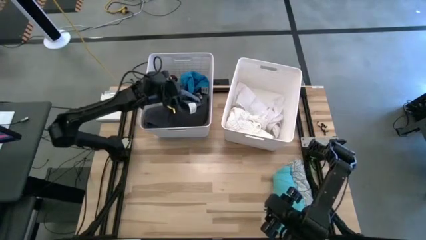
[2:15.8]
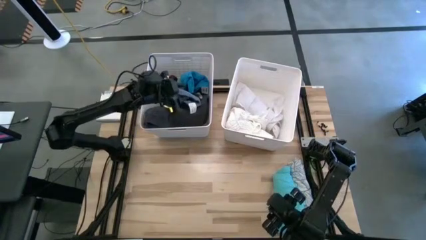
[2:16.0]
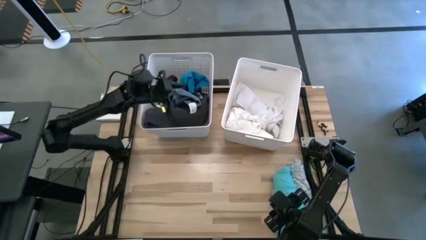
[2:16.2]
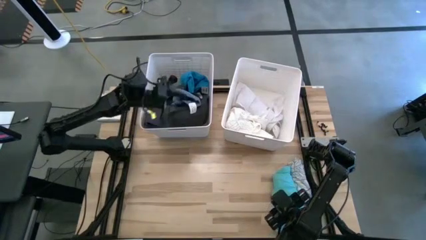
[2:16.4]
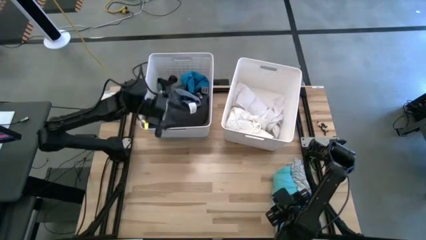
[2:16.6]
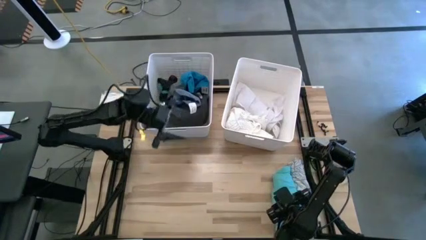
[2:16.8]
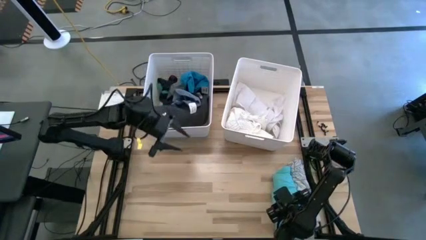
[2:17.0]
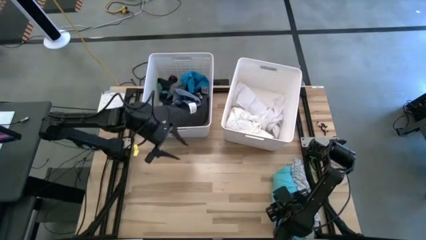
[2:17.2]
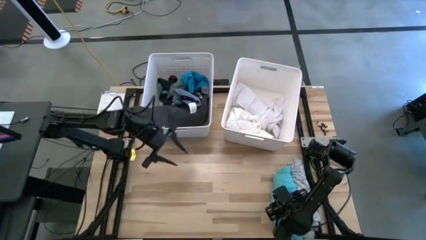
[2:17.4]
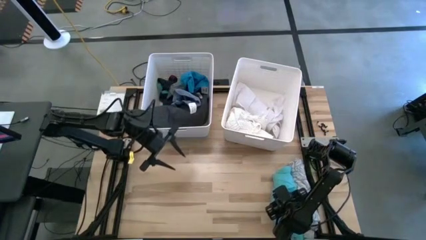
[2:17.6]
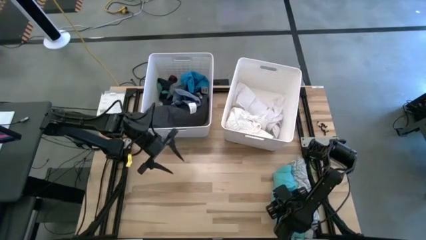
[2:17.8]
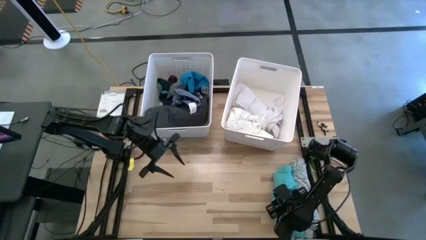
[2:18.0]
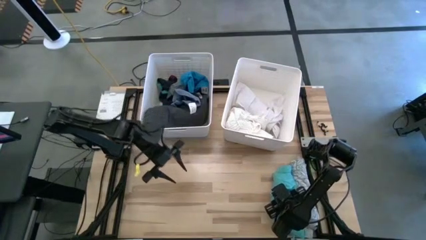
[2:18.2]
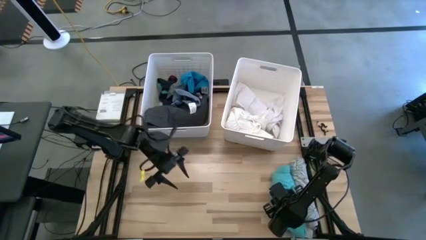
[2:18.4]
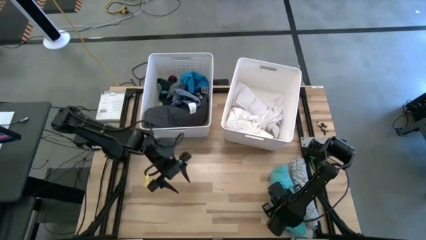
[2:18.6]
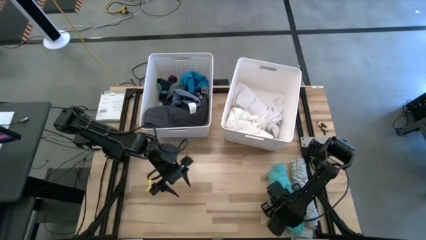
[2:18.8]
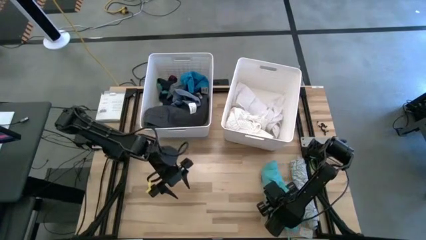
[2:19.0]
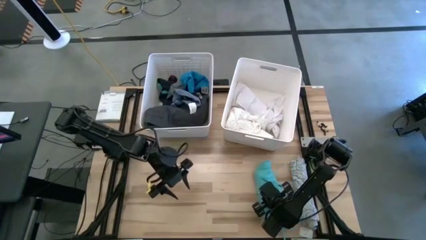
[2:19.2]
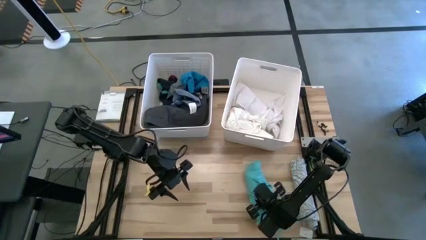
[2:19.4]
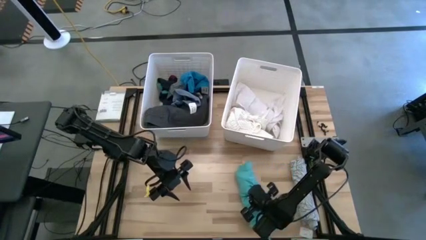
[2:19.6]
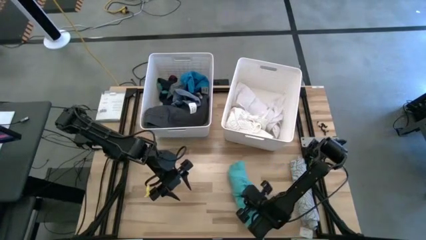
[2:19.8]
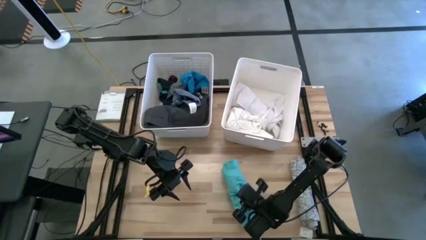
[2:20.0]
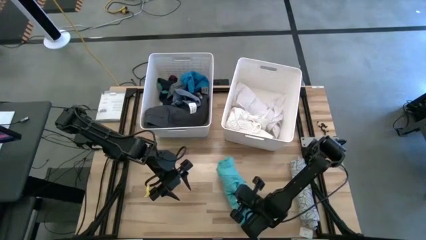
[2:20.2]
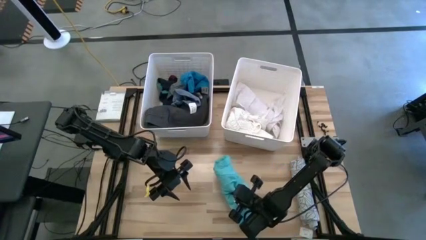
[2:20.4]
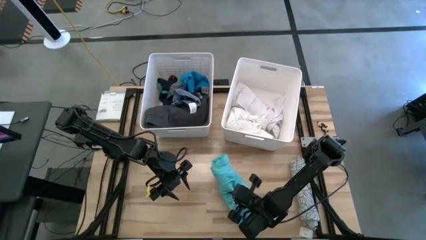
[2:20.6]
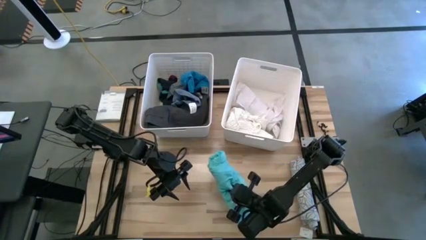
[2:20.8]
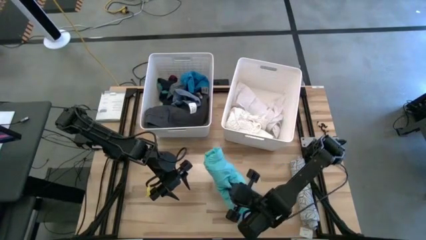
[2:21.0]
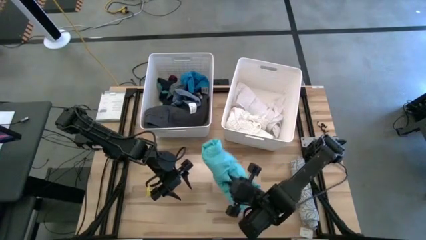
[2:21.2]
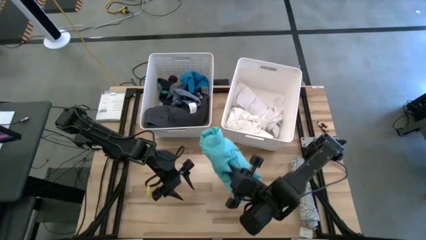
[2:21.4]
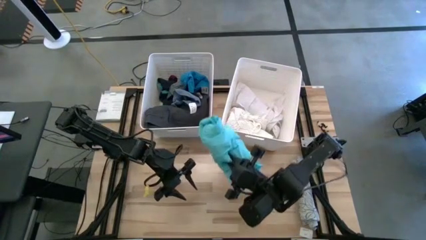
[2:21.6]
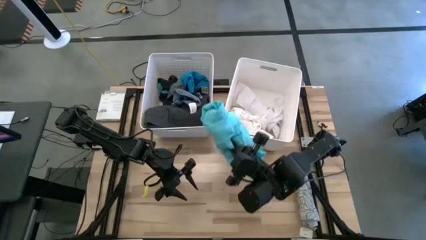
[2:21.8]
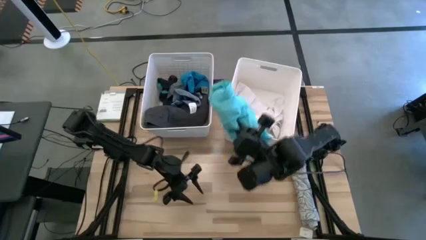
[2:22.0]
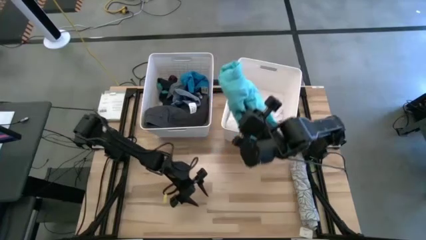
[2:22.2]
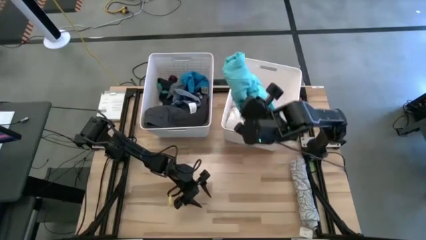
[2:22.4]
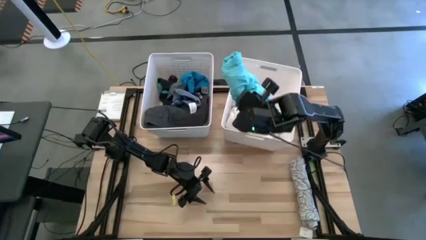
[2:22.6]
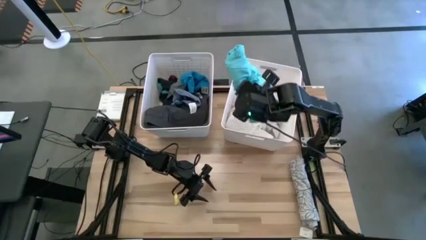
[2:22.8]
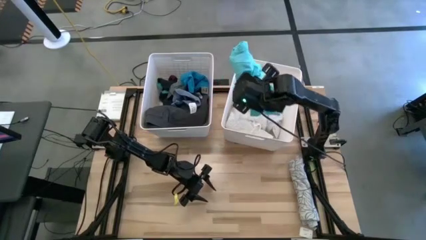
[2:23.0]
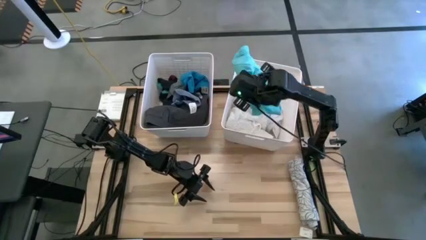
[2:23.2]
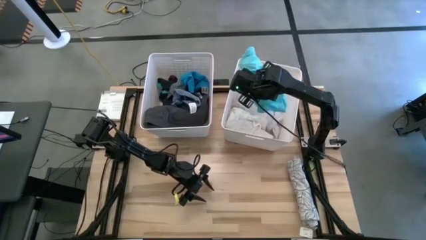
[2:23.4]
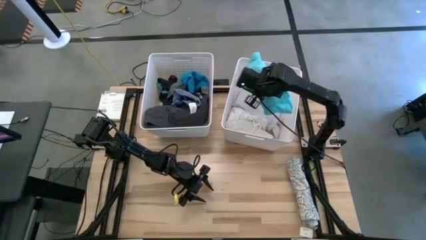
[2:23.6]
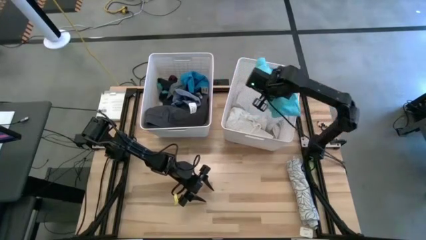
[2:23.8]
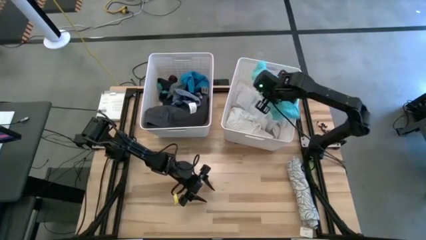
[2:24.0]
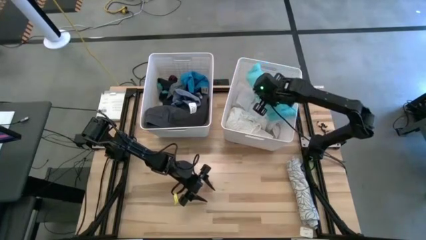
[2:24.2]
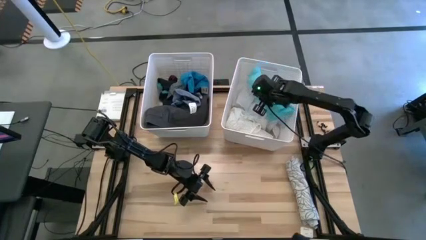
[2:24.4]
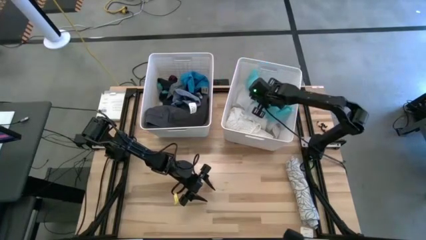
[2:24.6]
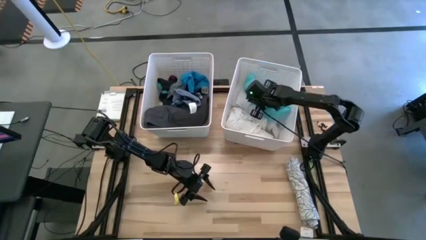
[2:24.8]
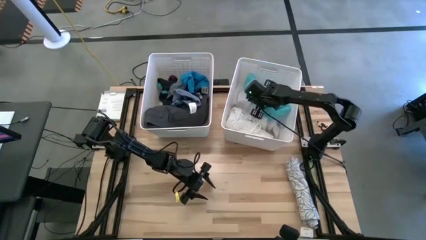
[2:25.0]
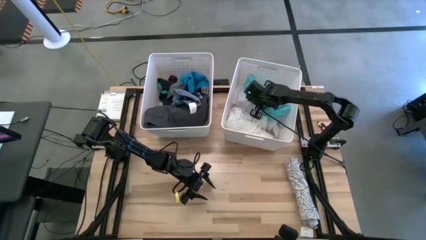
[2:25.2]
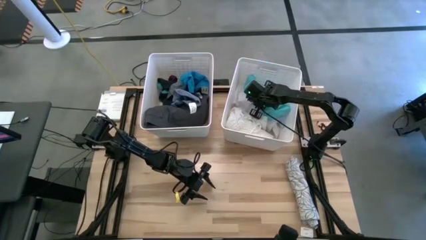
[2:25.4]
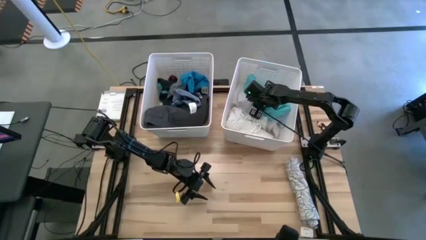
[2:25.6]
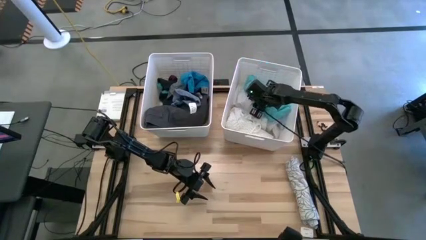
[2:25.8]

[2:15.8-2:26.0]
Task: Sort clothes
Put the rolled light blue shorts into the left white bin
